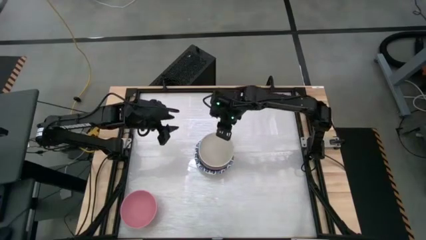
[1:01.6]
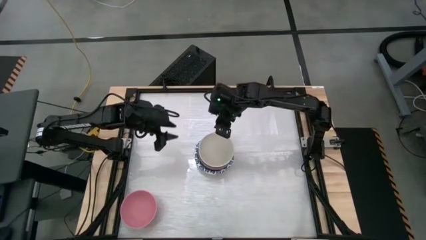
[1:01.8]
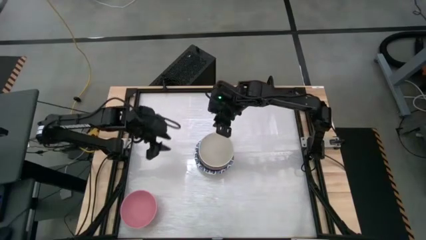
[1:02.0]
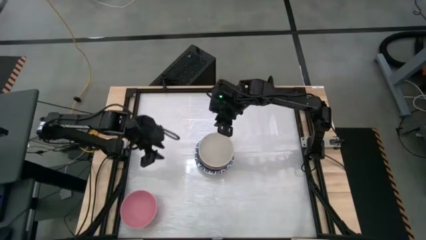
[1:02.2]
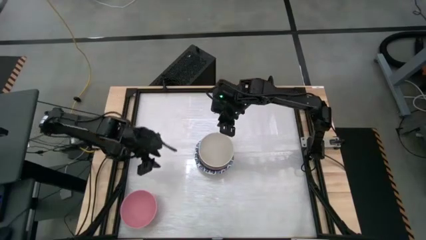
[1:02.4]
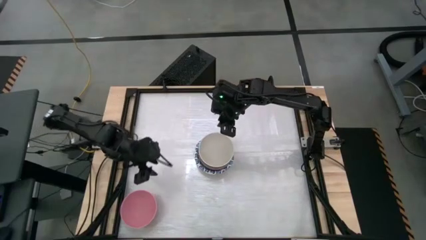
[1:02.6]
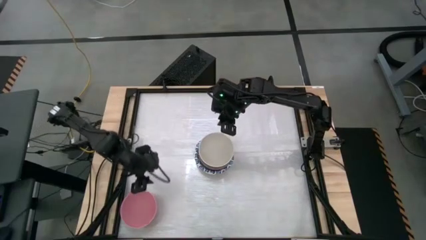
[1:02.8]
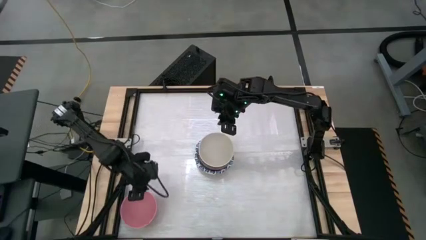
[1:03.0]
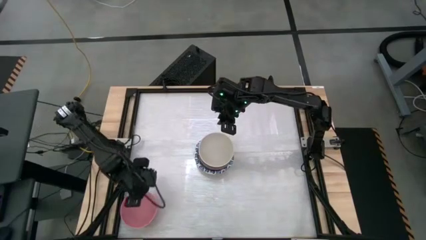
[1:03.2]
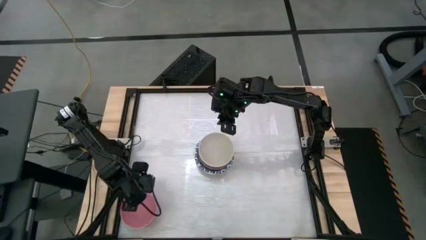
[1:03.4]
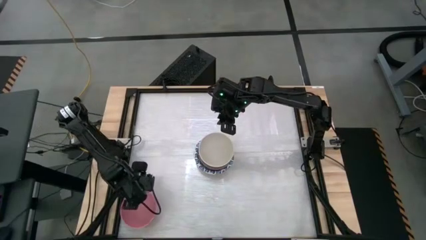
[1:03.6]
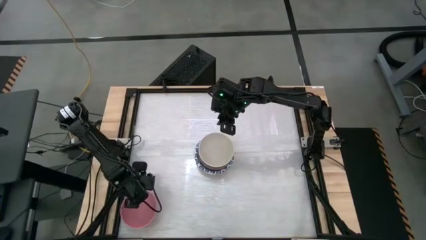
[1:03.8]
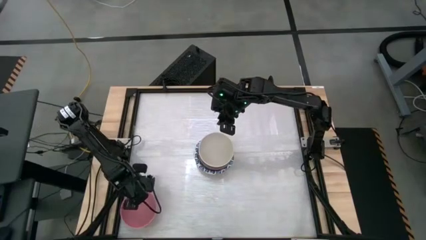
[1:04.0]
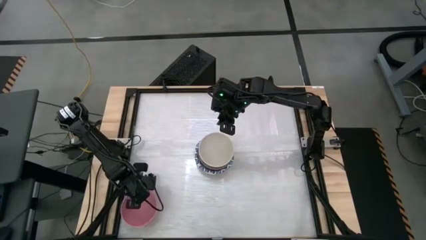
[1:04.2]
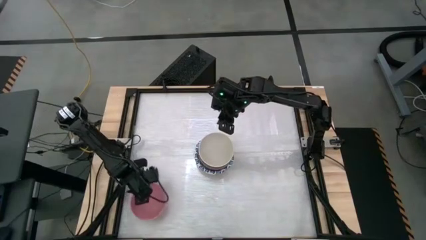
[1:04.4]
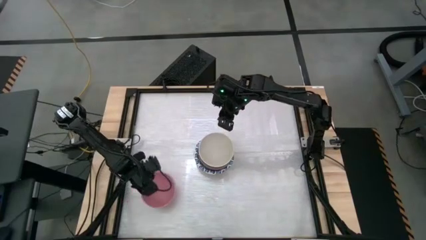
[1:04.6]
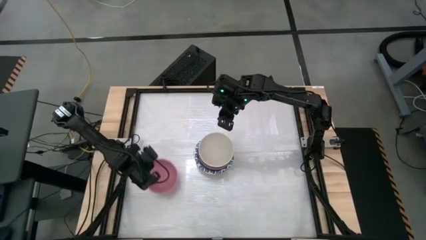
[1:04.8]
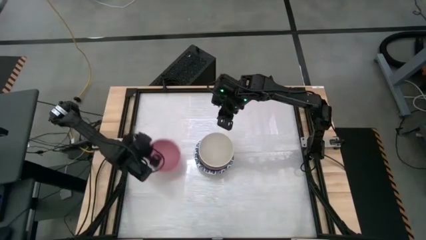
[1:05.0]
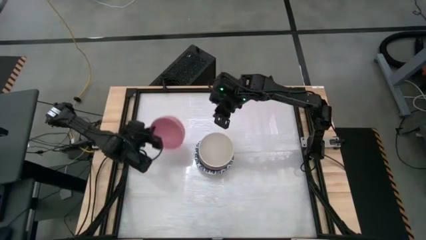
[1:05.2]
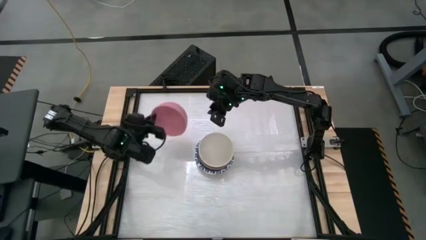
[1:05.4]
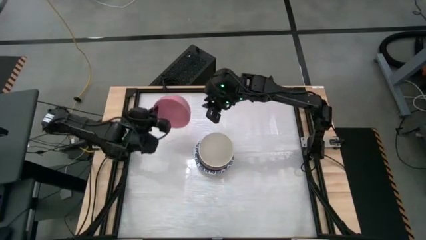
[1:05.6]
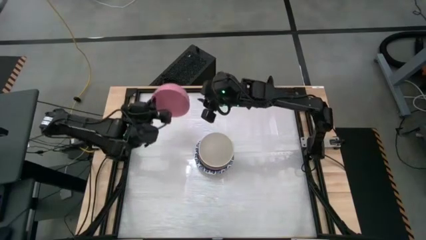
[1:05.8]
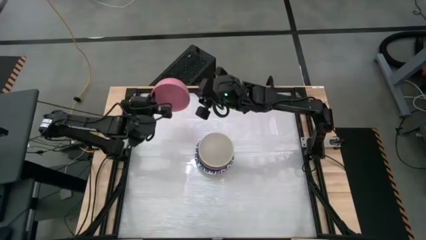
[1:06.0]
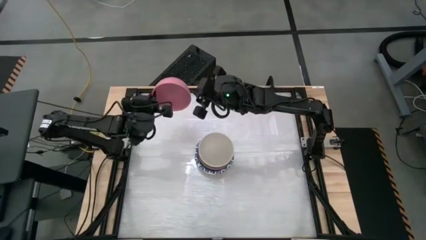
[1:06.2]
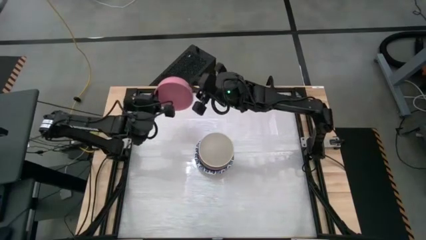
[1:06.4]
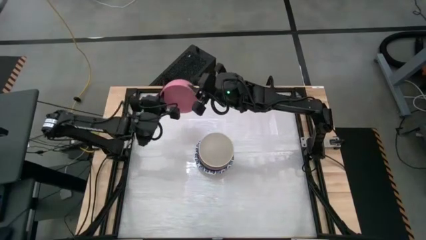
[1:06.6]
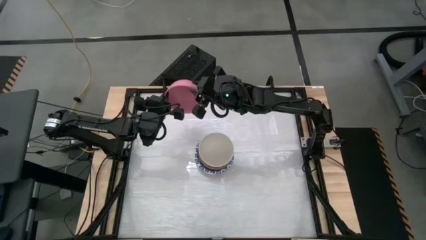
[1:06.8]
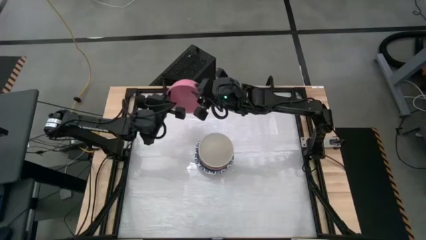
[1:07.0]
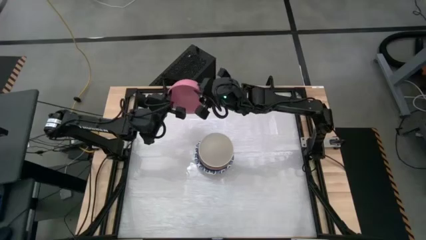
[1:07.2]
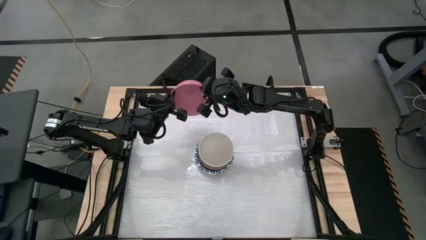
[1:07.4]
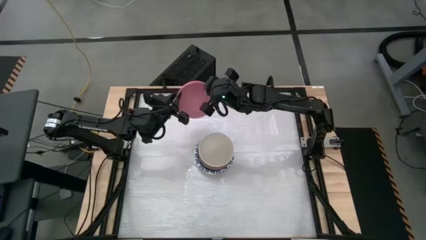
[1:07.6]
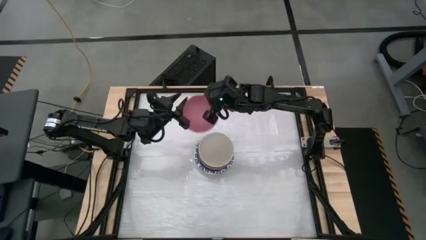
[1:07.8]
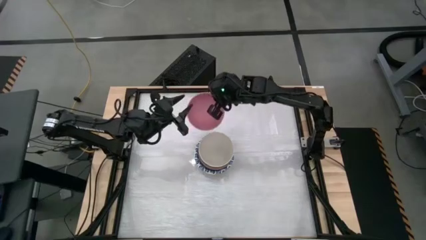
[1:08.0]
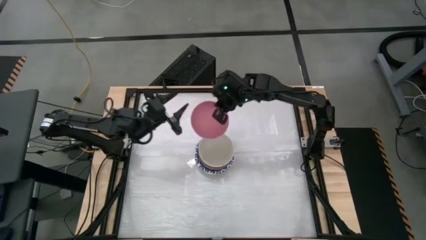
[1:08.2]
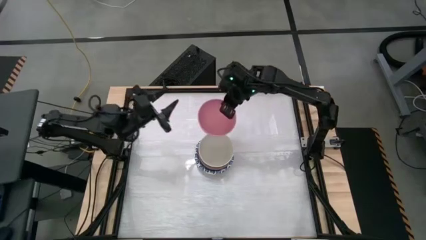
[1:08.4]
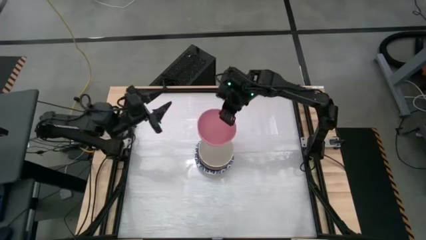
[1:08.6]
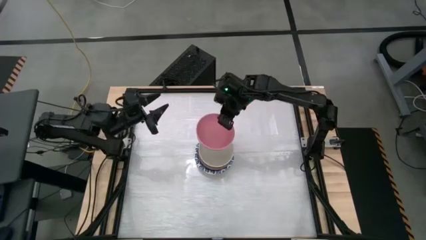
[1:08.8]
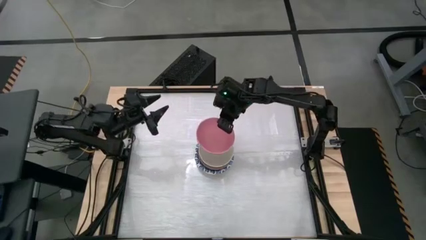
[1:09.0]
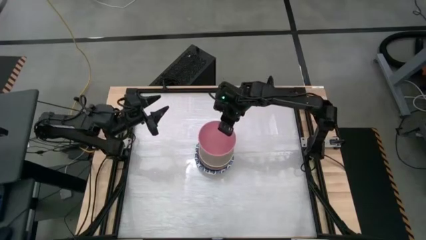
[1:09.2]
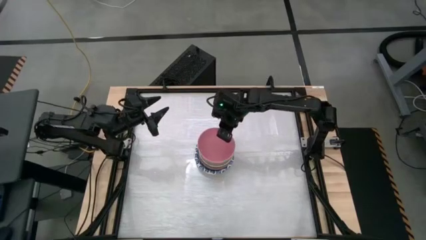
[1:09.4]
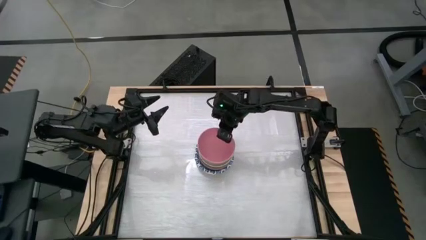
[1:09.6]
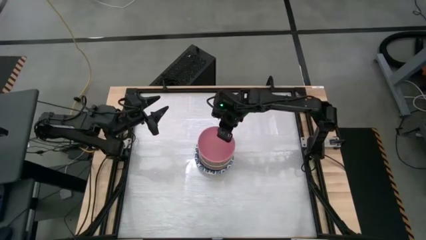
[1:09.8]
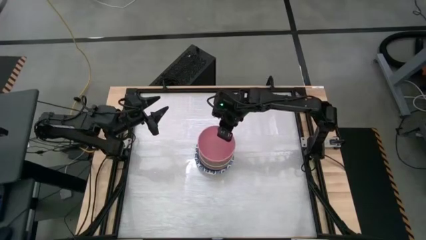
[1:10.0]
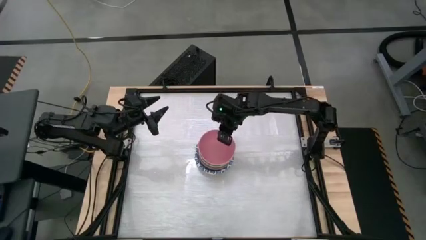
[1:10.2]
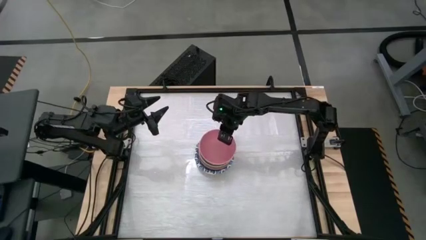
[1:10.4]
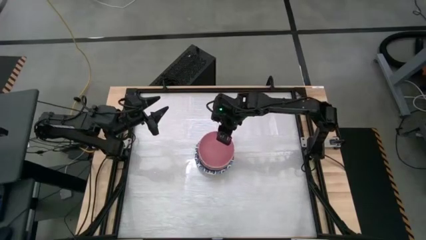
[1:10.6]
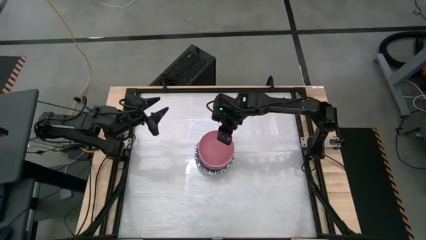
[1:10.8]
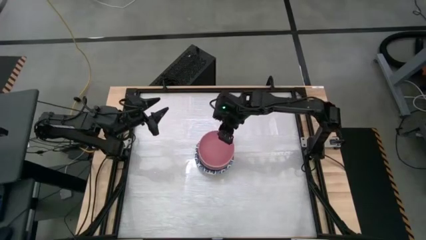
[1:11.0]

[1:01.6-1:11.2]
Stack the pink bowl on top of the white bowl
